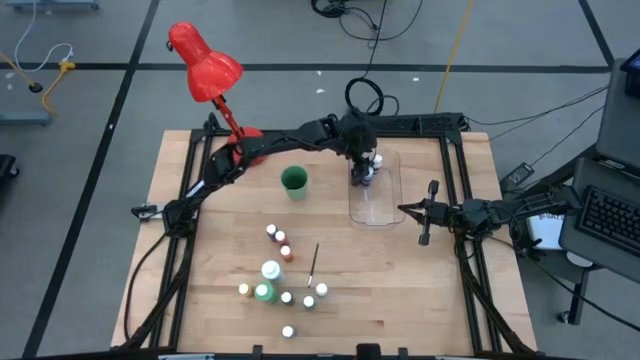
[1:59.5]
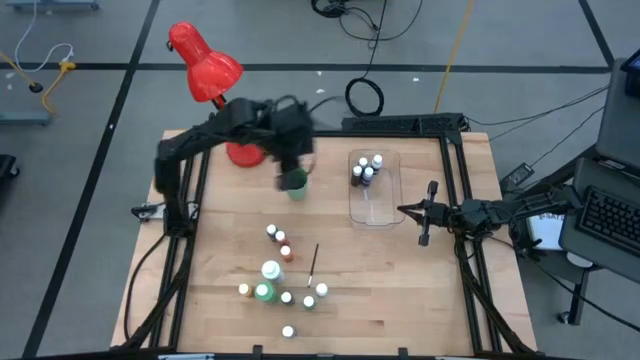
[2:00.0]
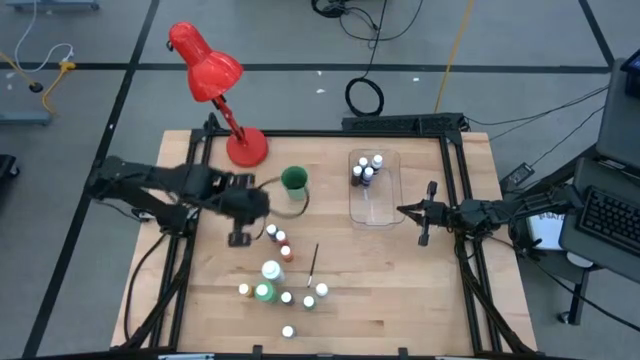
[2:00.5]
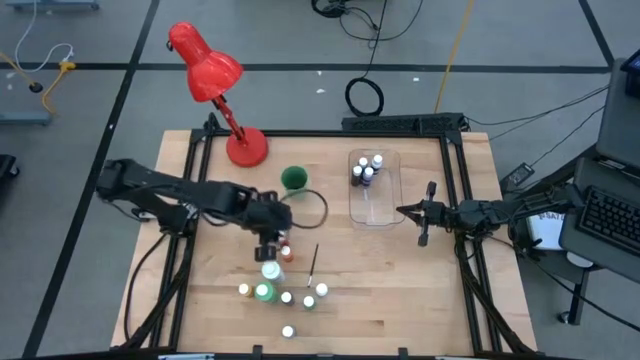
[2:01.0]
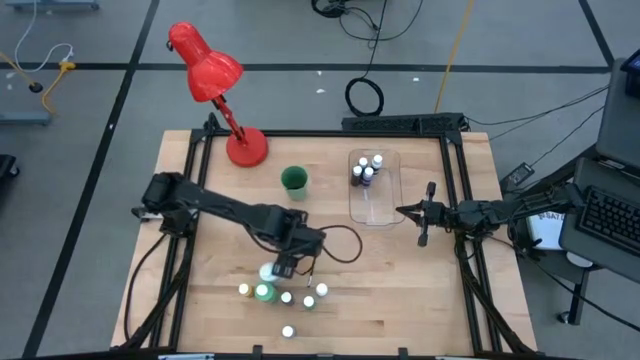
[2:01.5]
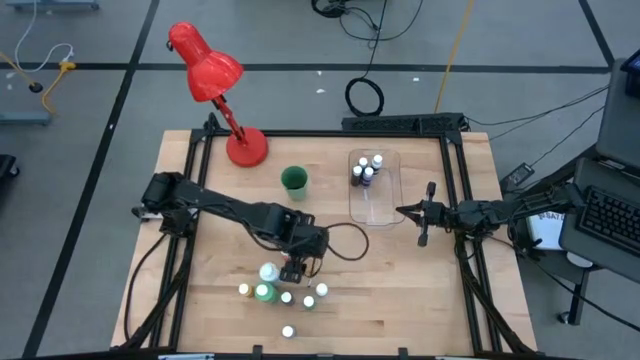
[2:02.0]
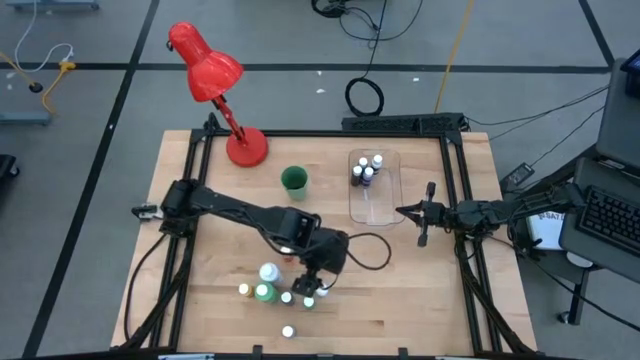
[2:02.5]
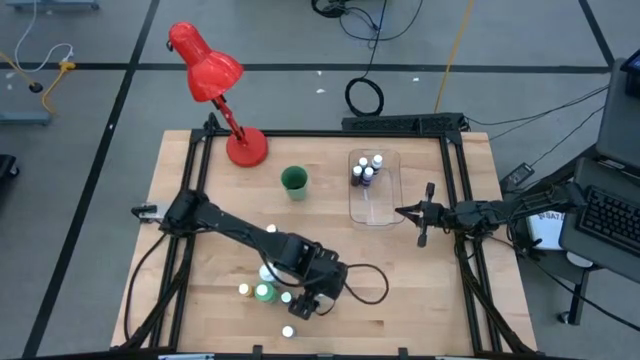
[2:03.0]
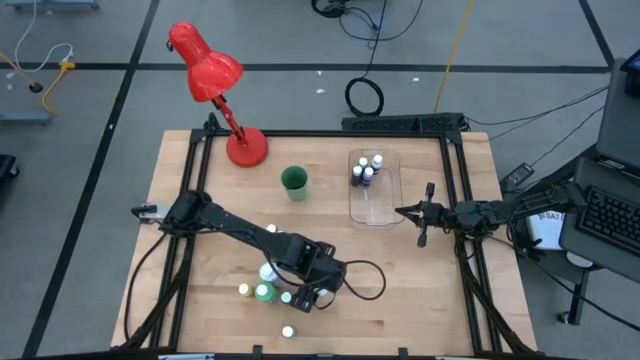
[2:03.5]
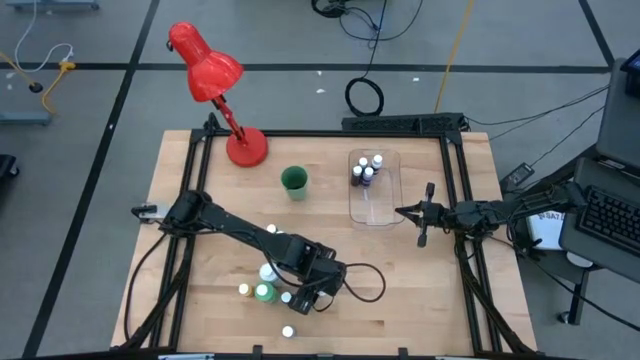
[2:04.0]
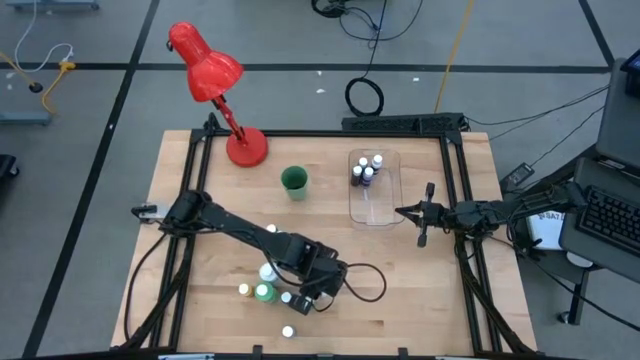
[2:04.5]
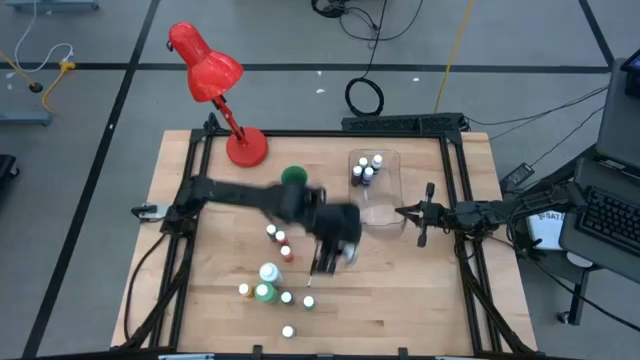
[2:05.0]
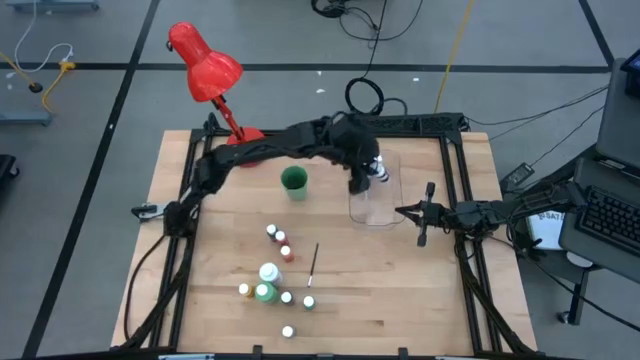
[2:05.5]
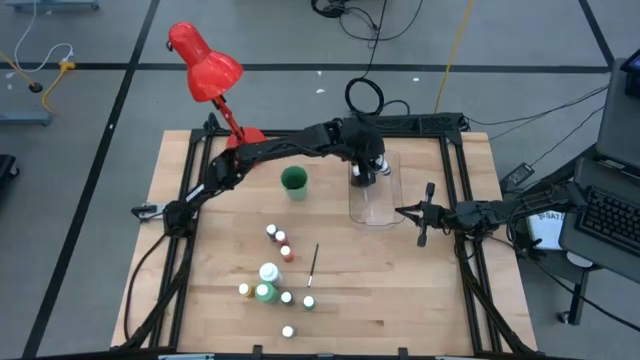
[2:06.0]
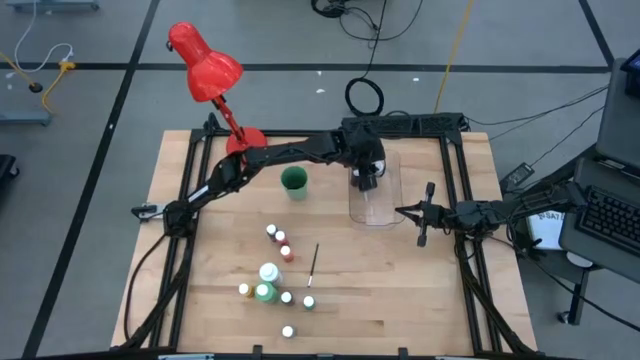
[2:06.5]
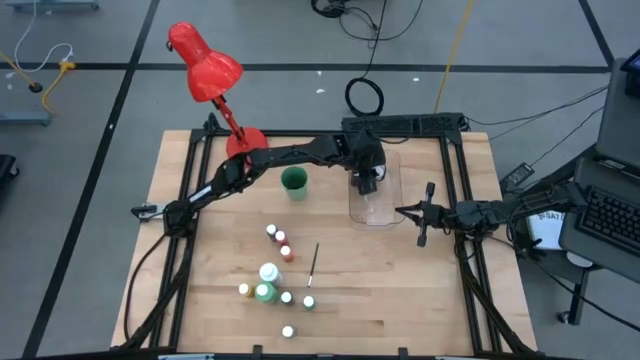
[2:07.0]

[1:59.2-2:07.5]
Task: Pick & Place Paint Supplies
Put the white paint bottle into the transparent bin

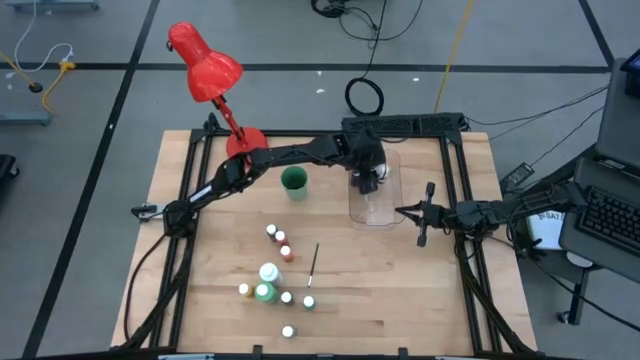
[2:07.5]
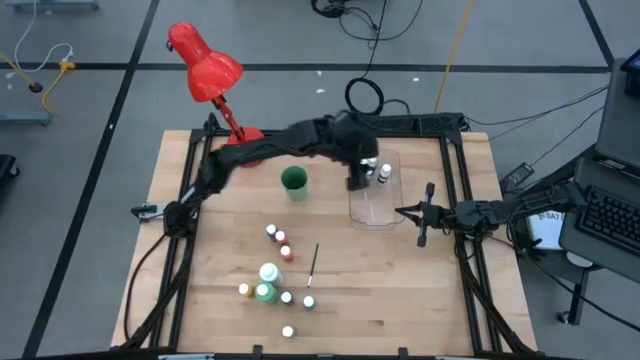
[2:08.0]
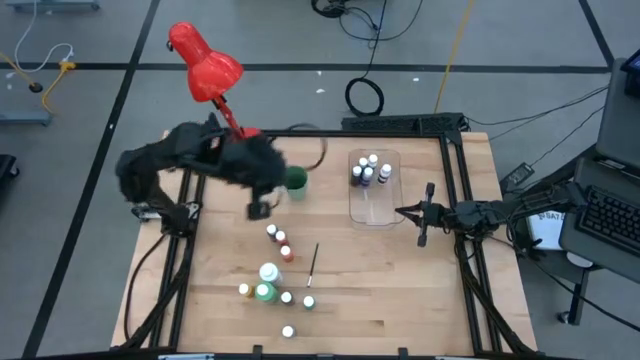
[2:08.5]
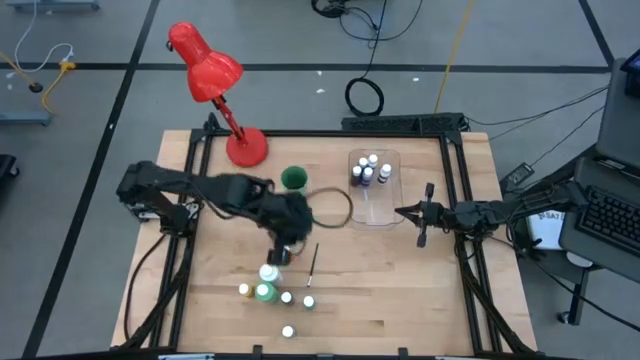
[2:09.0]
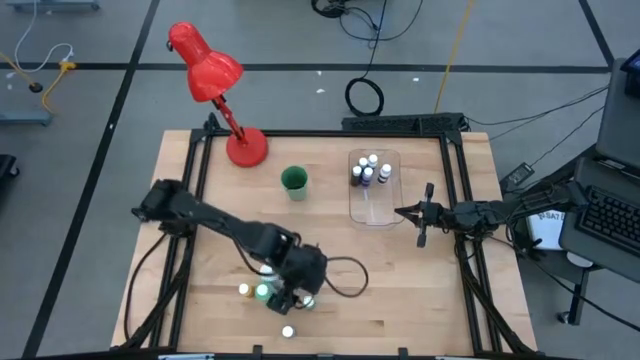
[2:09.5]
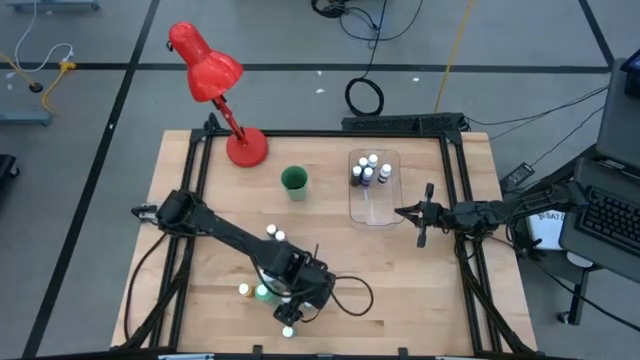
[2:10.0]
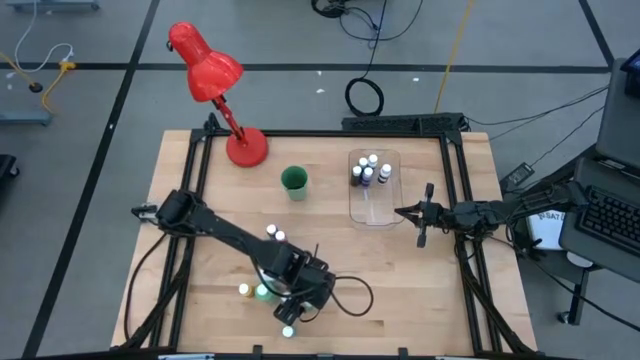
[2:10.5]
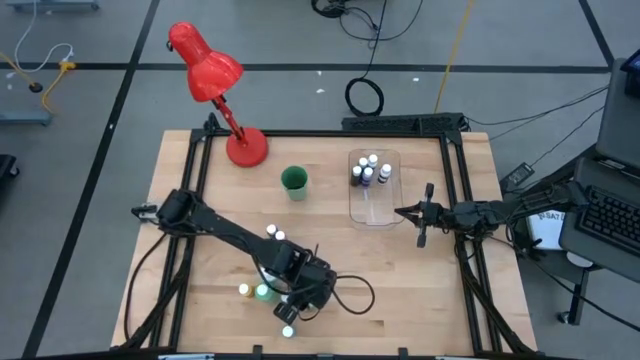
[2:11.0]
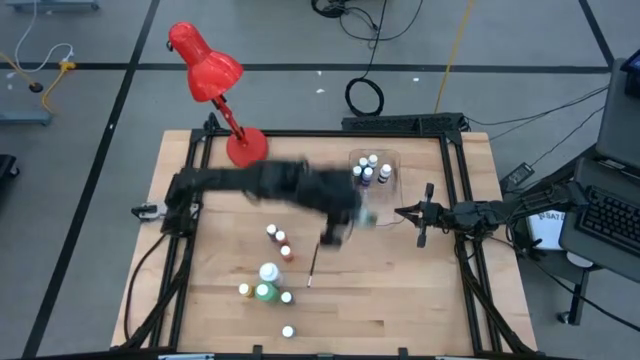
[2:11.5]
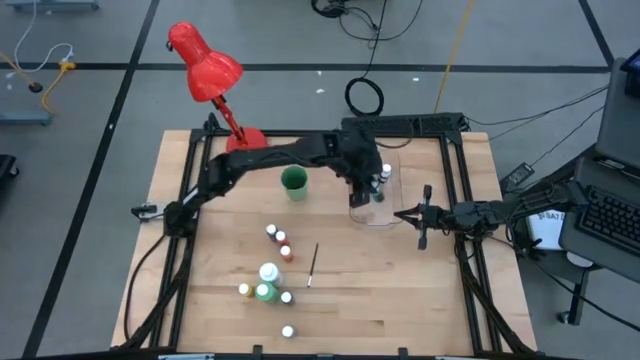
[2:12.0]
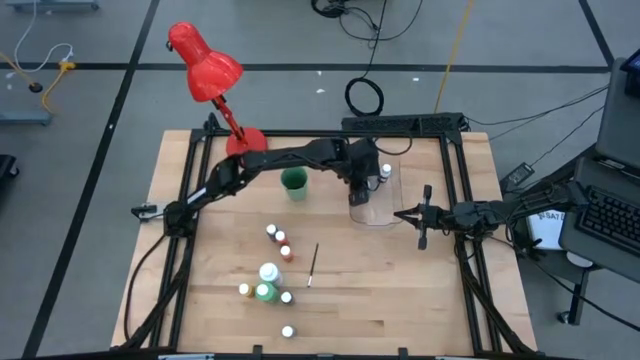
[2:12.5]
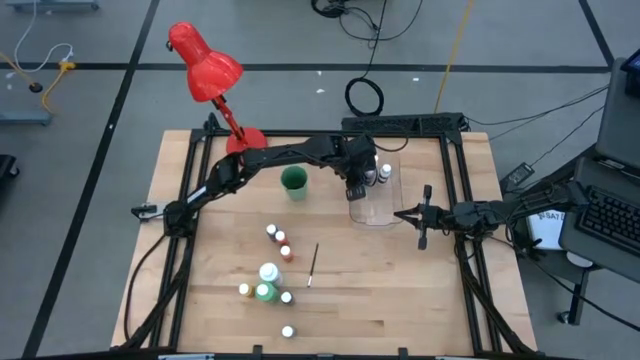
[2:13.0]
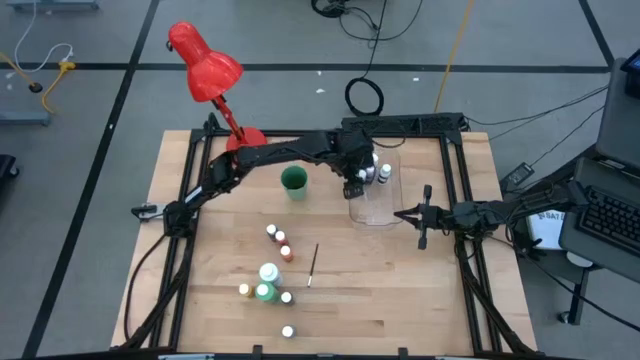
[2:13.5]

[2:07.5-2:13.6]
Put the green paint bottle into the transparent bin

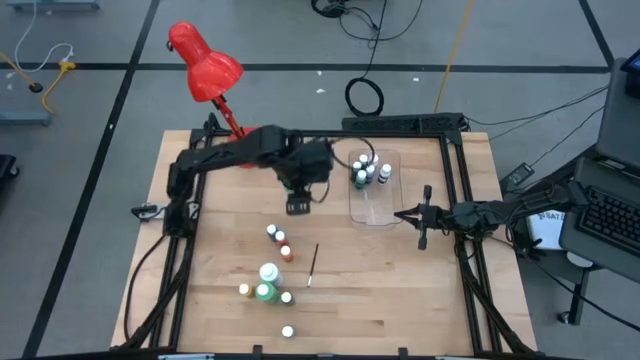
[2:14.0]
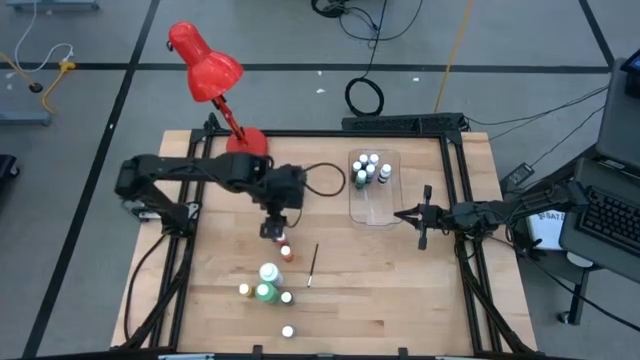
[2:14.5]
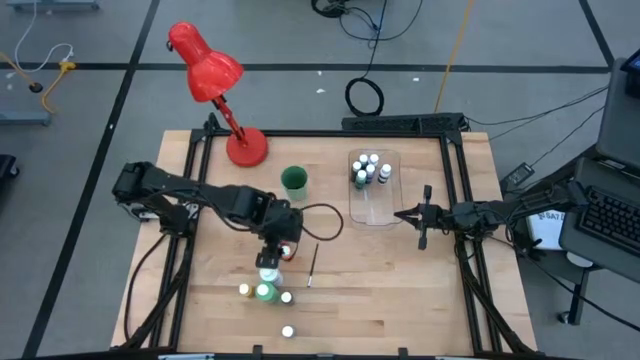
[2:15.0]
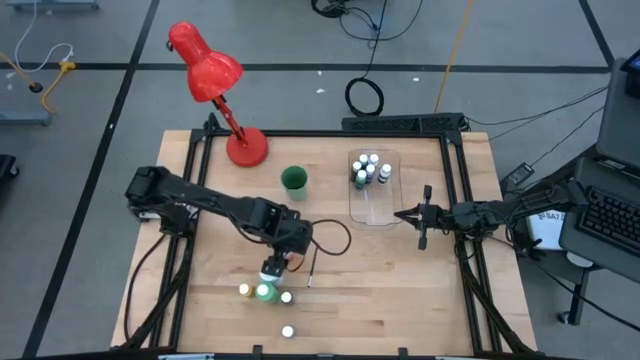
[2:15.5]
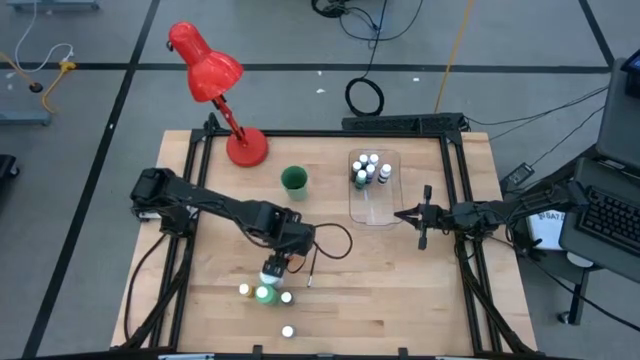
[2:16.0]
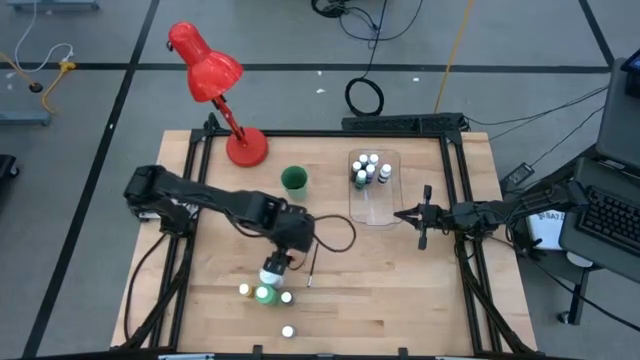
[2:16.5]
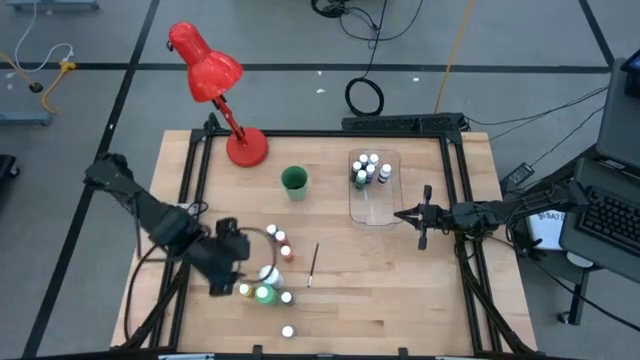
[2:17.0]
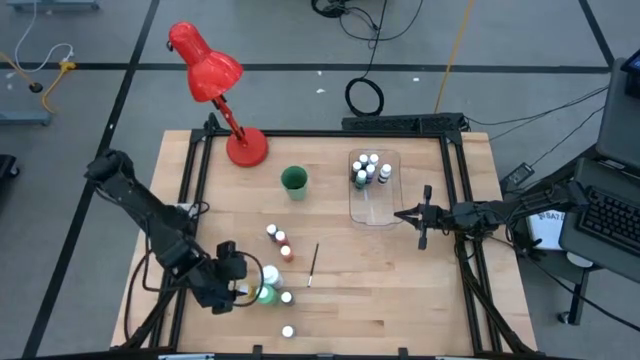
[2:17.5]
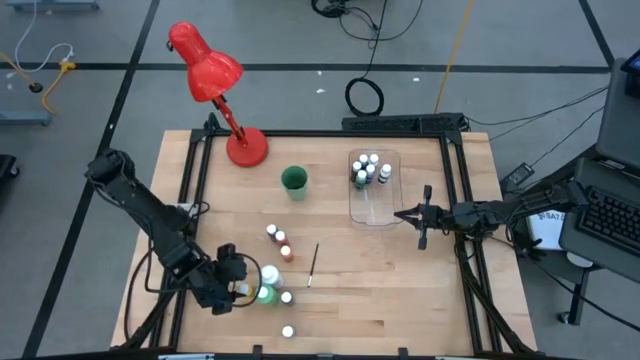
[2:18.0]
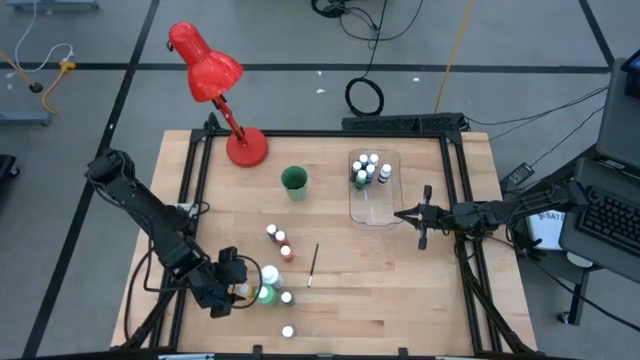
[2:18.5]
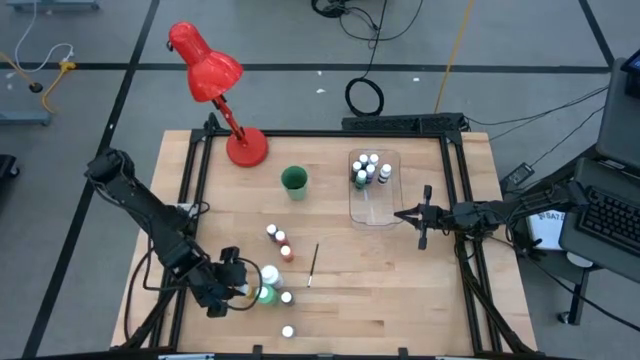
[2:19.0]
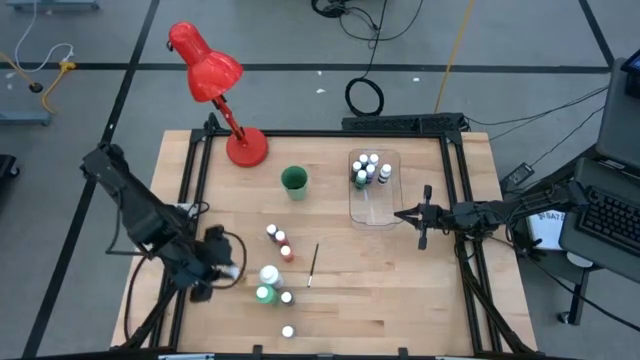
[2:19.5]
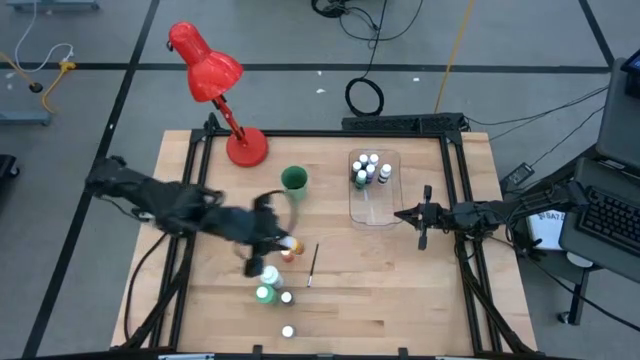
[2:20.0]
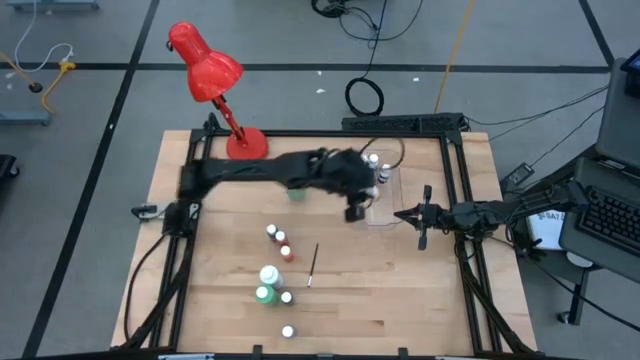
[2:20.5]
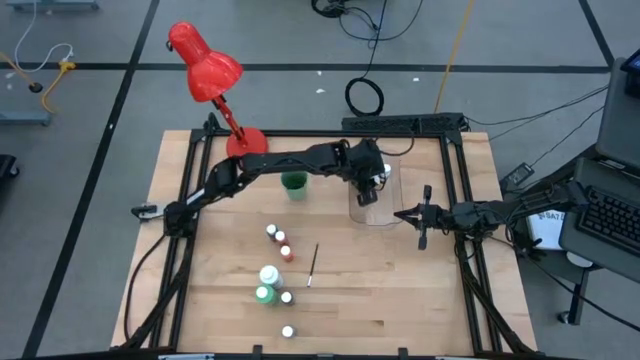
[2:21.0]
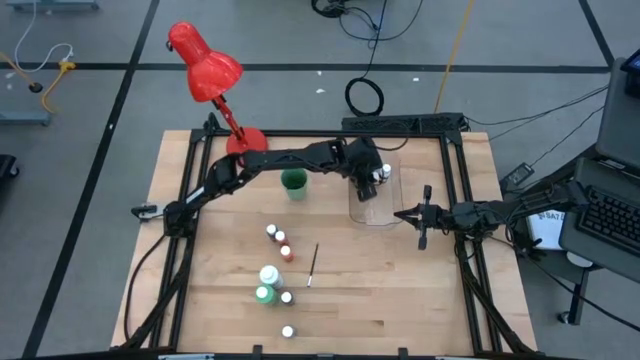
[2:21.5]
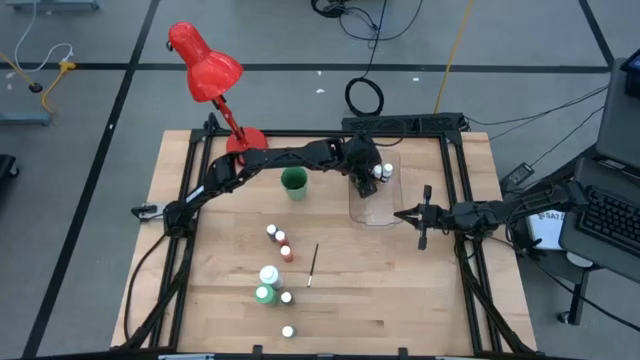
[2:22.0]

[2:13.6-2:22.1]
Put the yellow paint bottle into the transparent bin
